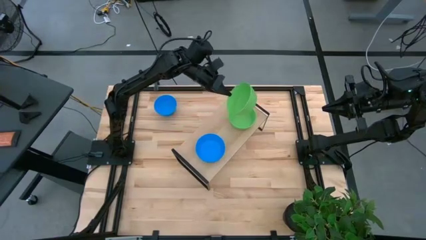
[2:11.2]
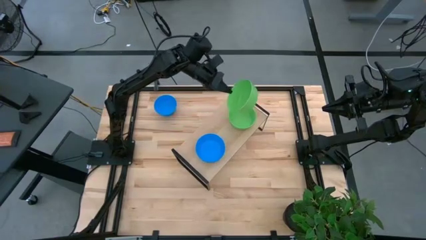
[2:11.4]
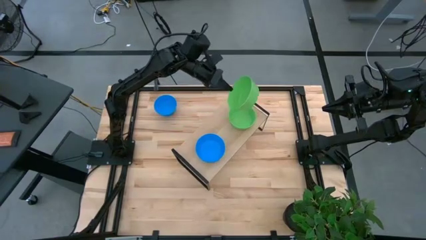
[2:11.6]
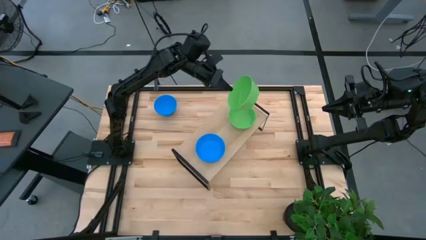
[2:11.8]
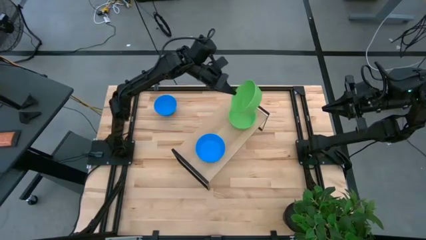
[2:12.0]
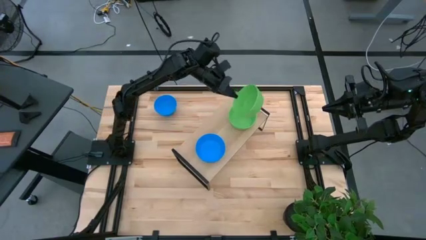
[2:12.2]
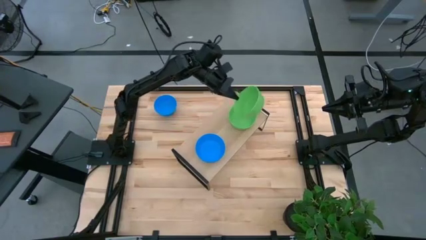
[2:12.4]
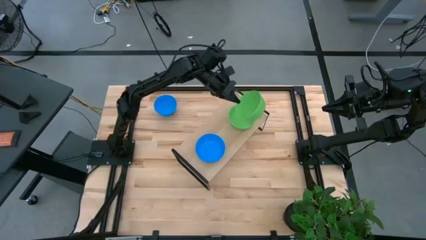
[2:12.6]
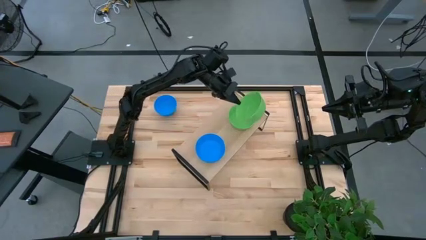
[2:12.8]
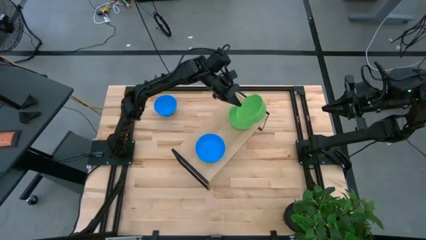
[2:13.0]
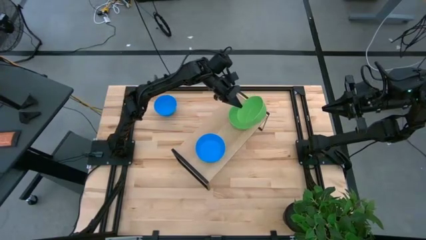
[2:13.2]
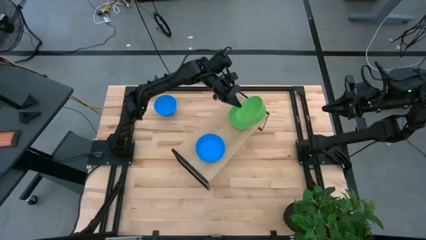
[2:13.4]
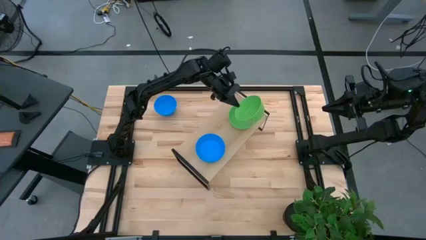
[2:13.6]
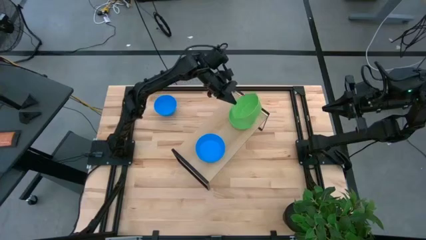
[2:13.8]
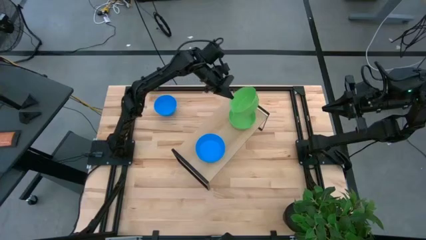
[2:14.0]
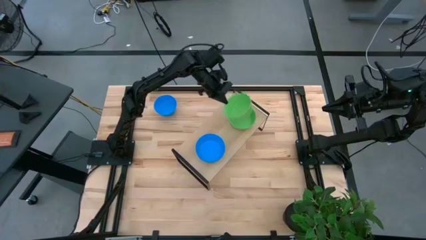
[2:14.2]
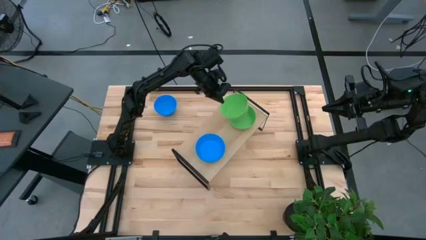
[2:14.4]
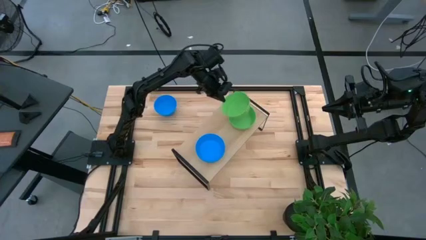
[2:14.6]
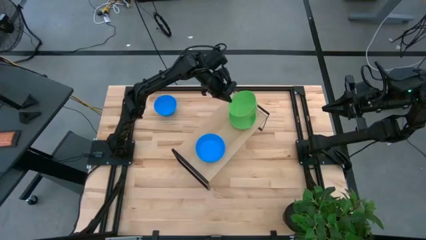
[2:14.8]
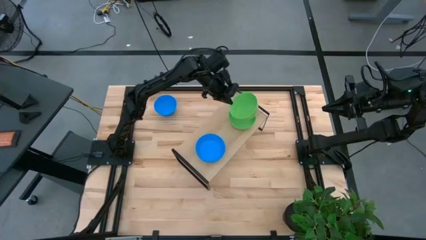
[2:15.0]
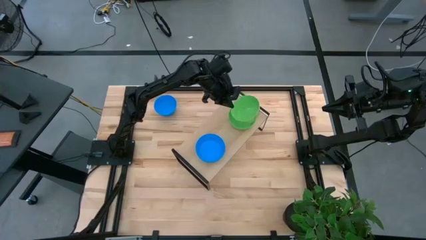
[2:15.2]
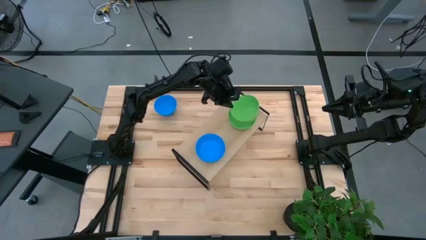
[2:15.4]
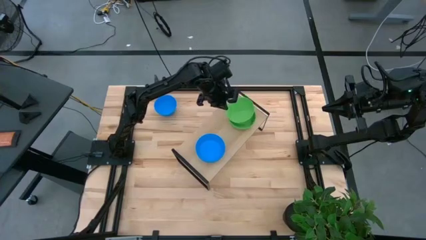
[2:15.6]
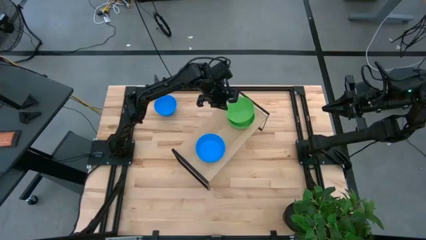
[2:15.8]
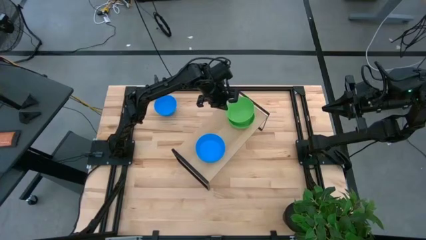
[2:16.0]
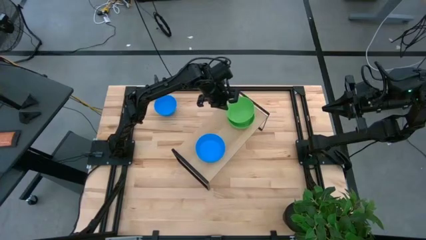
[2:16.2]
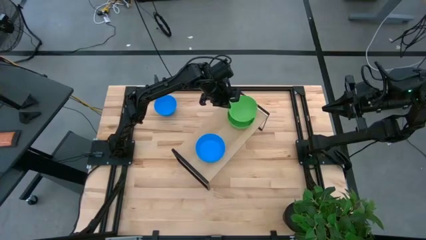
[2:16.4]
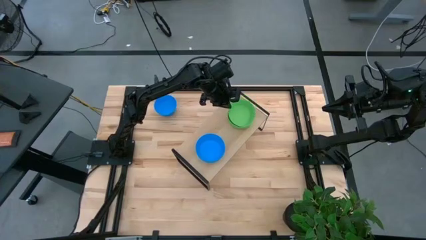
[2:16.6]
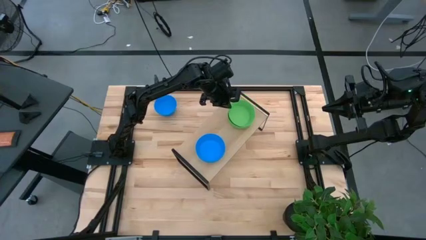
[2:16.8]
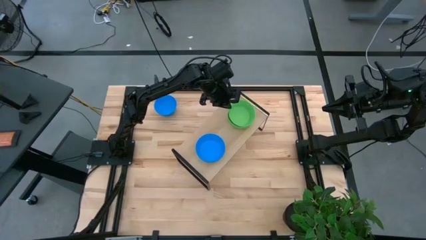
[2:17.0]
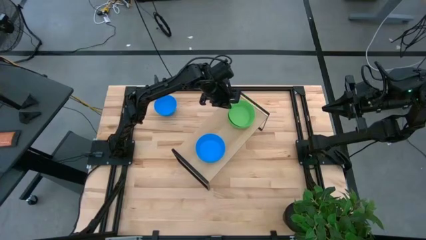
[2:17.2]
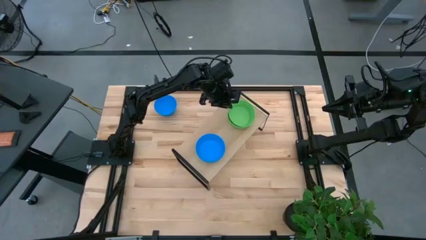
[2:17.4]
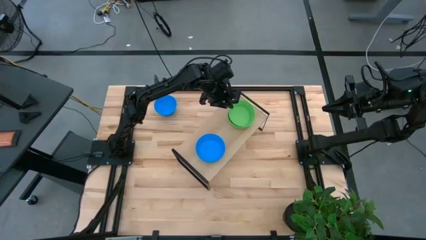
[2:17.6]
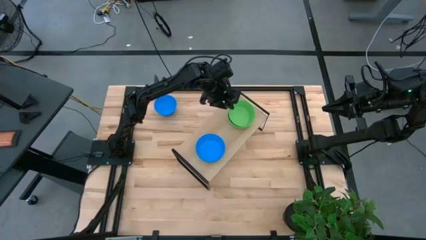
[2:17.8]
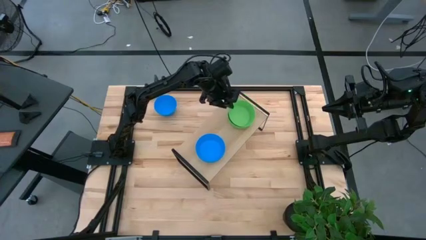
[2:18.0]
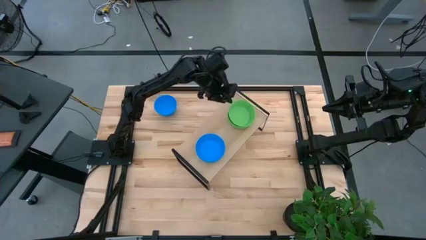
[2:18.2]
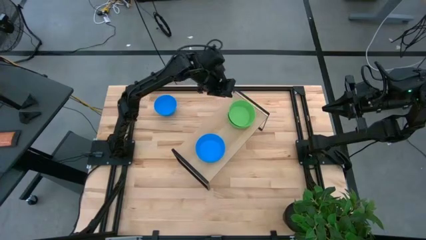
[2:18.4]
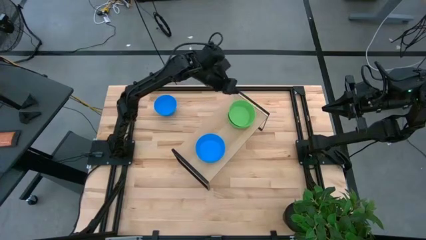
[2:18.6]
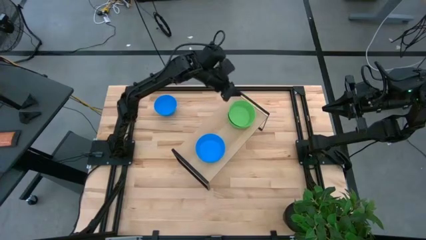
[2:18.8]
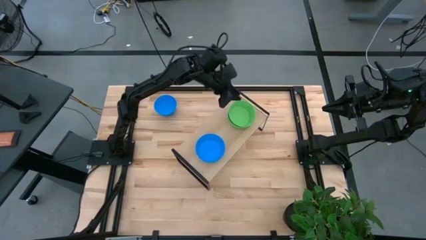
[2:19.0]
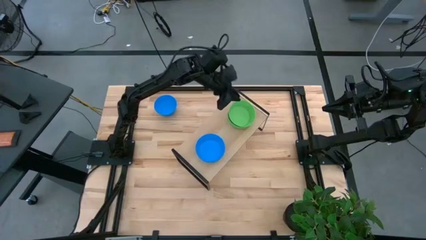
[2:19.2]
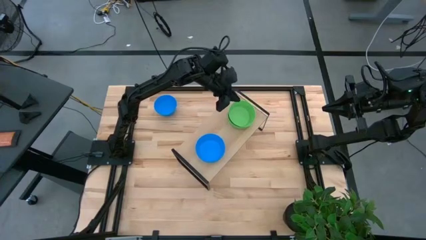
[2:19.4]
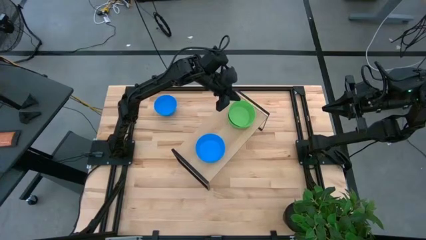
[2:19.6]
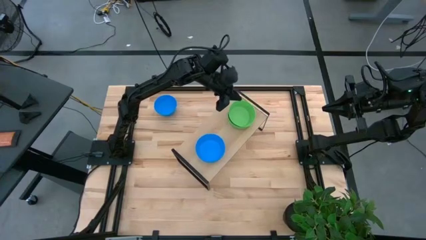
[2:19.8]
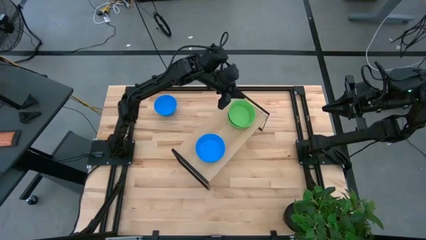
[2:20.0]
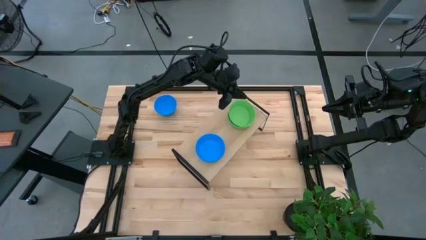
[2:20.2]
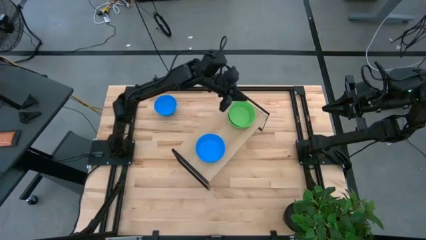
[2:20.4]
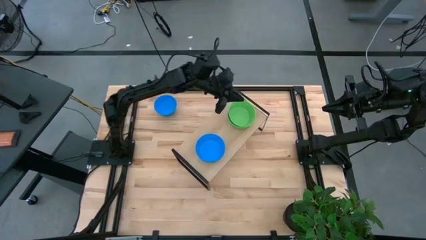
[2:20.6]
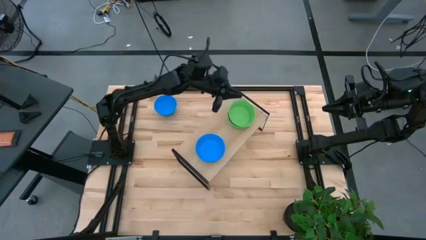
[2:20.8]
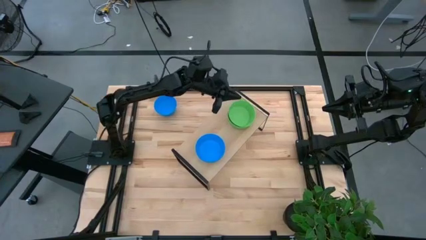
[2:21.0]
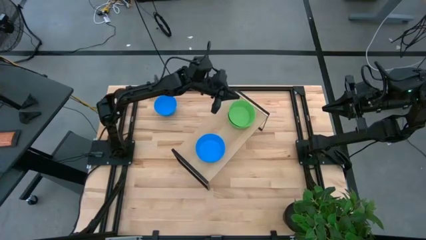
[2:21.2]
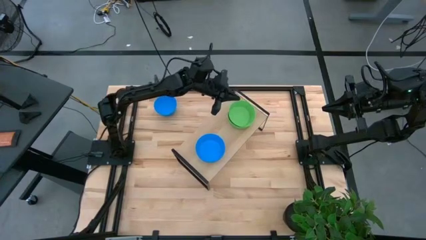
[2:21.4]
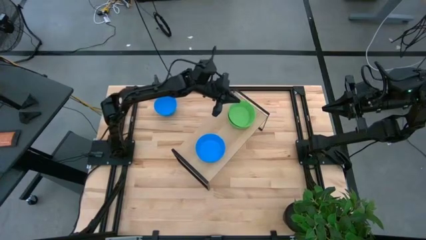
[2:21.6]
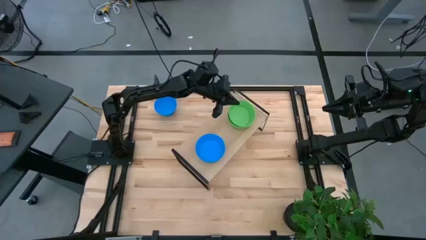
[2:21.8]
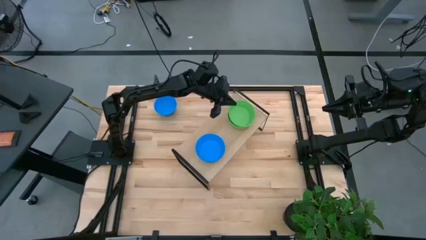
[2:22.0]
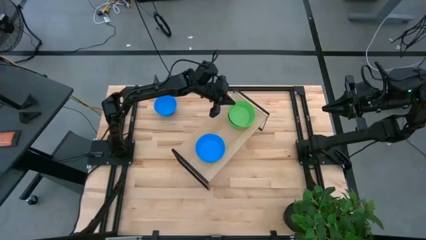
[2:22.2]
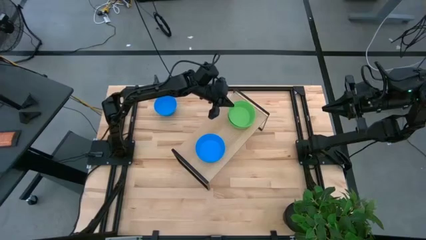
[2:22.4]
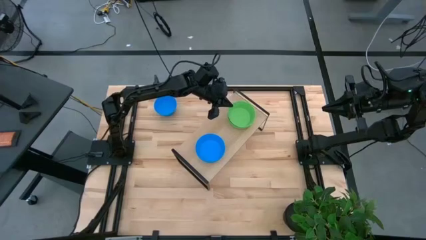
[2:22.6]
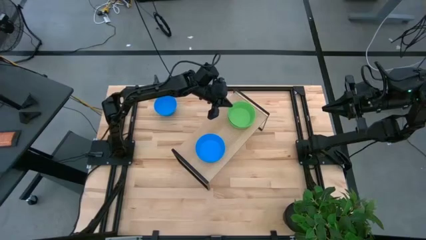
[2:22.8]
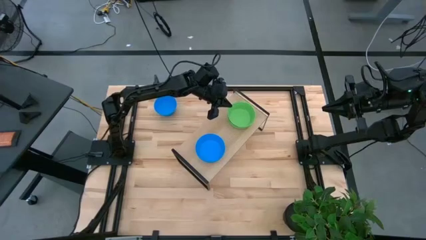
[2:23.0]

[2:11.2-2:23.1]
Task: Pick & Place Mini bowls
Stack the green bowl on top of the green bowl on the shelf

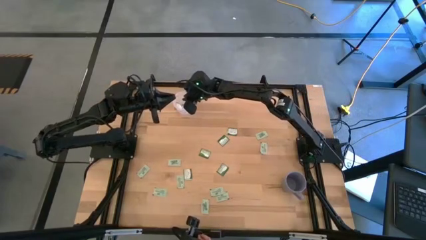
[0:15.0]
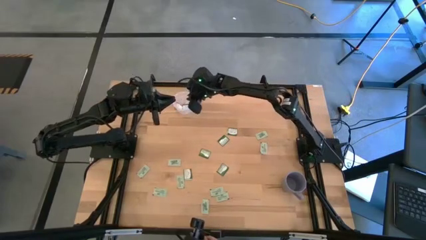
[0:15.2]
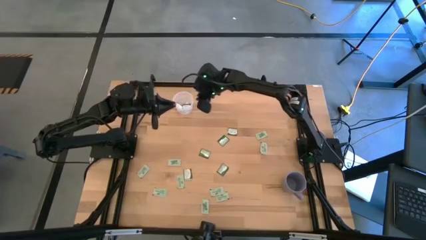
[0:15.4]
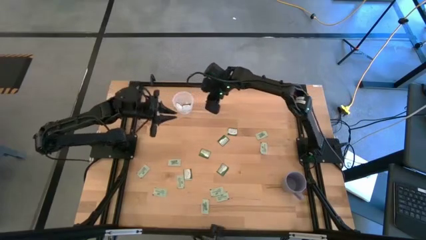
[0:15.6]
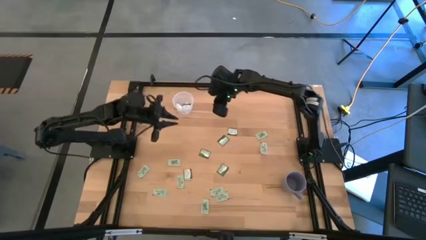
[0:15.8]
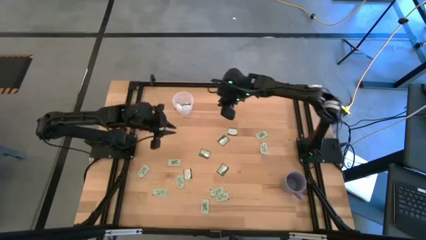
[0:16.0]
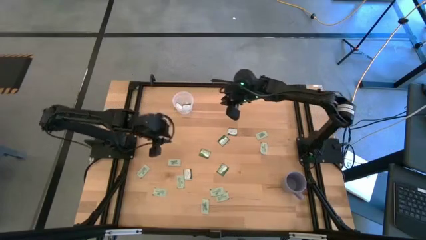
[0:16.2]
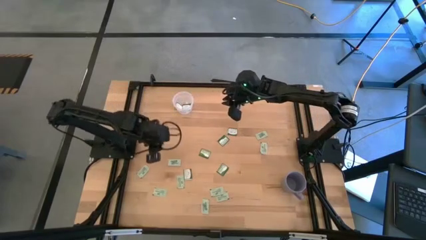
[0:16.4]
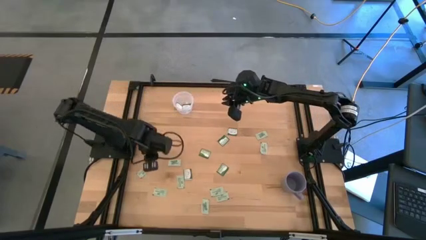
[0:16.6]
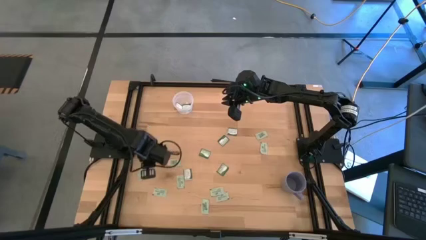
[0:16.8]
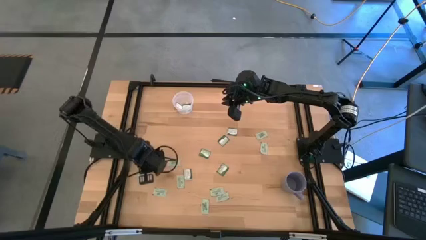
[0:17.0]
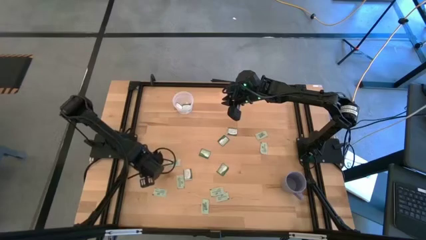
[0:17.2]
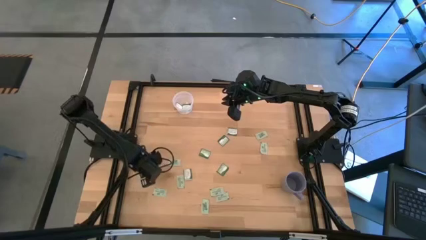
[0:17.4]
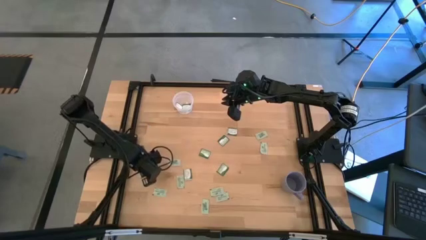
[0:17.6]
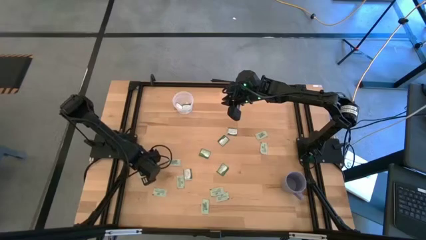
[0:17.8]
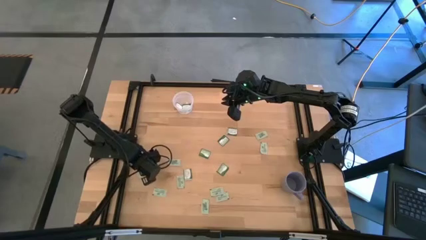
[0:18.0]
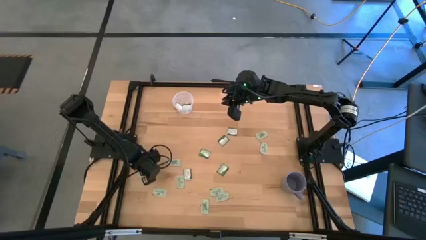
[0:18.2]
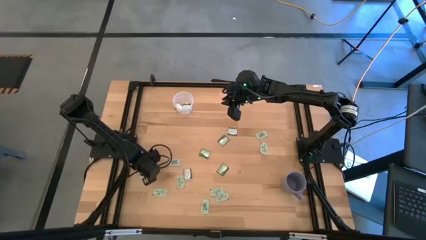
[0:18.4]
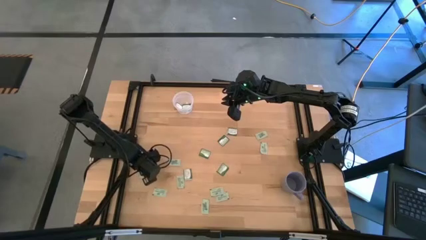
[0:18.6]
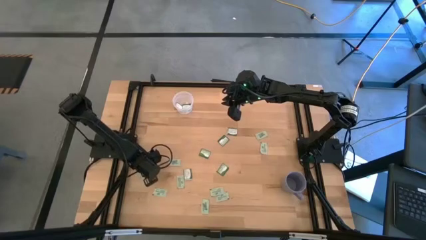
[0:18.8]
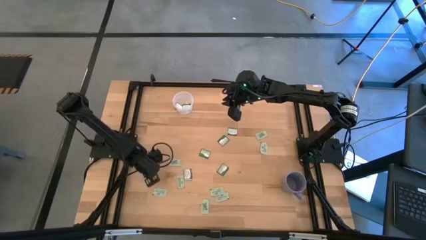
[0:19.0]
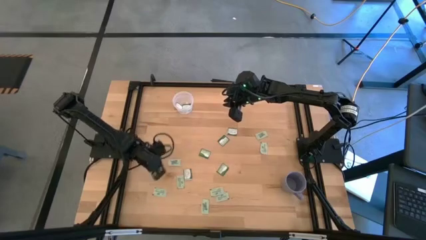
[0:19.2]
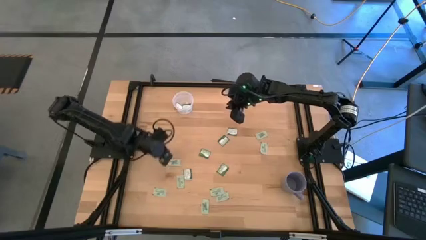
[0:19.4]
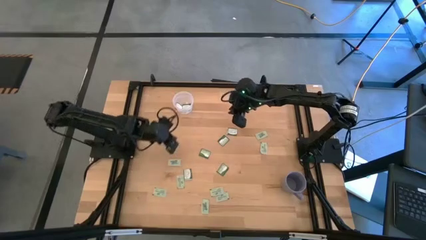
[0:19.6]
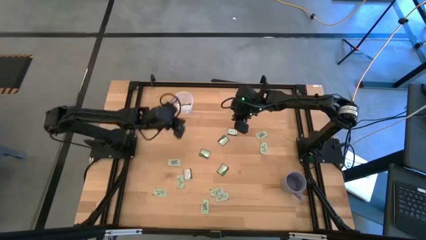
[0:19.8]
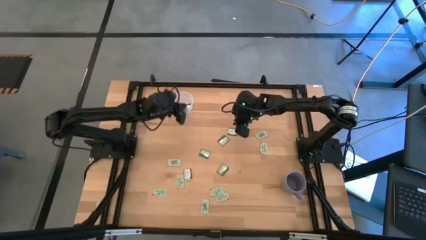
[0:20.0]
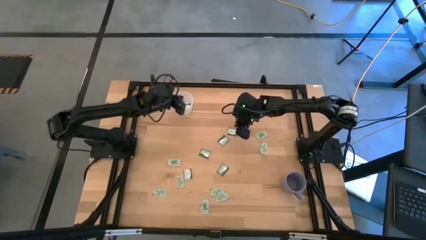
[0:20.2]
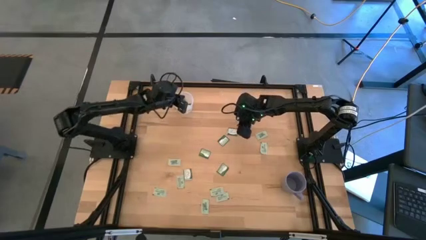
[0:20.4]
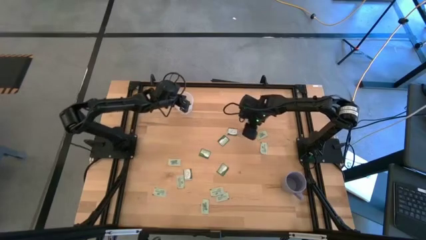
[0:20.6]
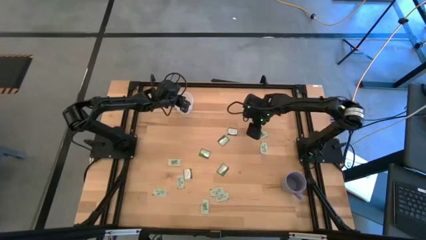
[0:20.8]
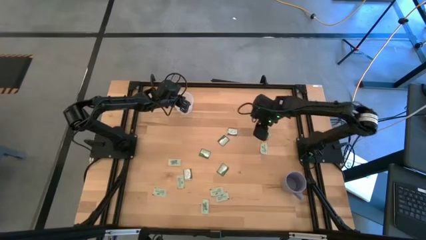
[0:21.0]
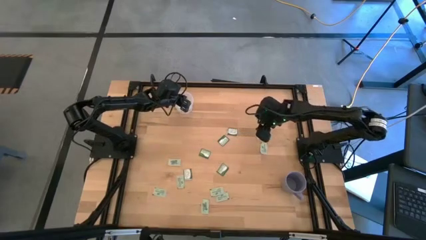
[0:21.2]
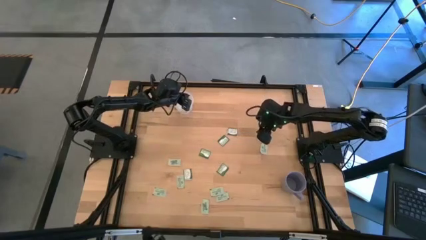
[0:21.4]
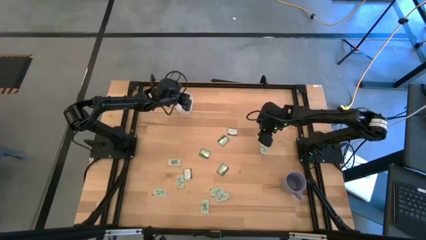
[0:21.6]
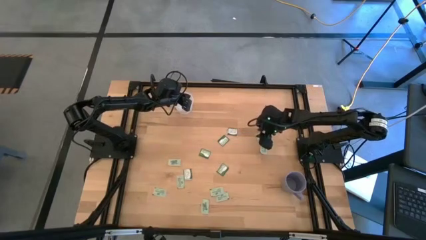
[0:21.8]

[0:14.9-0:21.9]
Task: Pick and place items into bin
Put the stevia packet into the transparent bin
